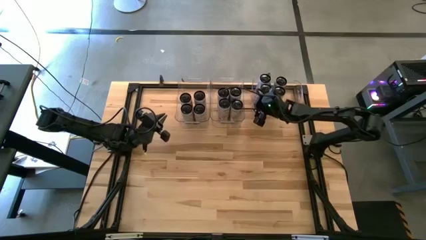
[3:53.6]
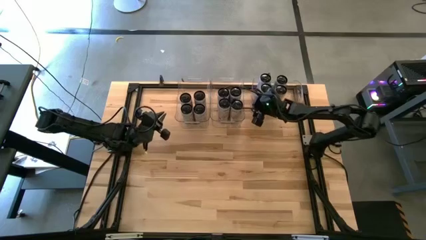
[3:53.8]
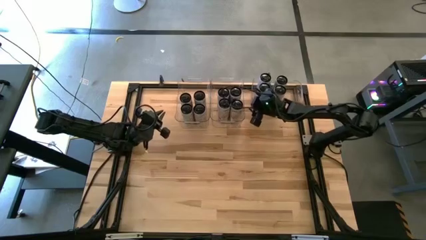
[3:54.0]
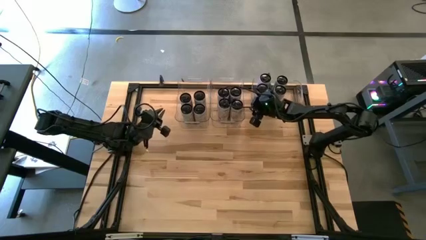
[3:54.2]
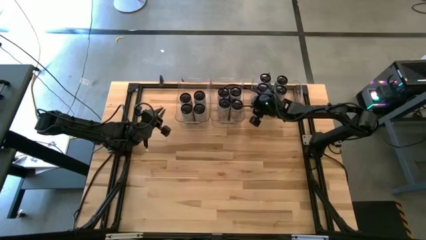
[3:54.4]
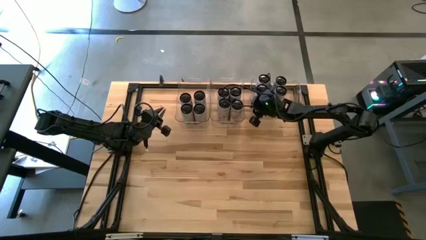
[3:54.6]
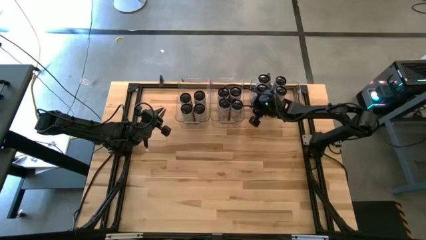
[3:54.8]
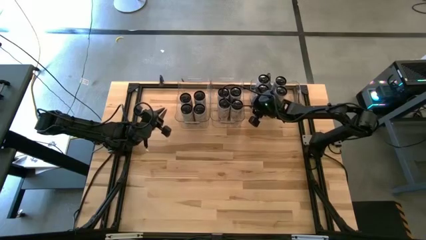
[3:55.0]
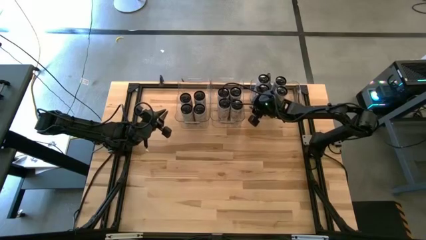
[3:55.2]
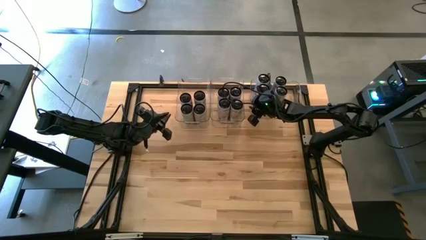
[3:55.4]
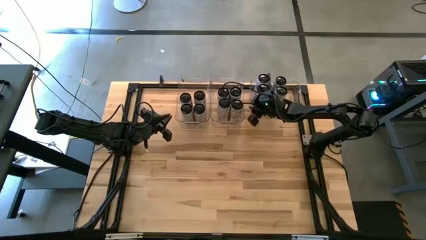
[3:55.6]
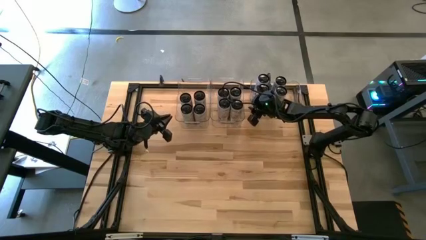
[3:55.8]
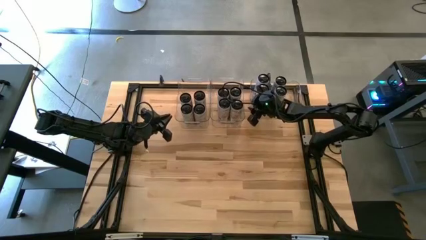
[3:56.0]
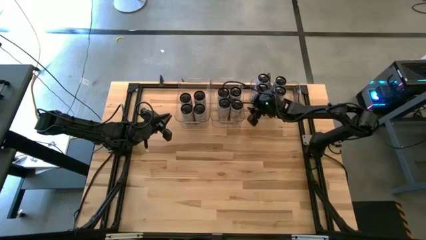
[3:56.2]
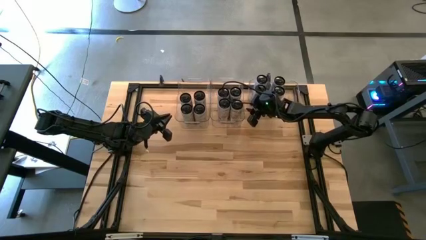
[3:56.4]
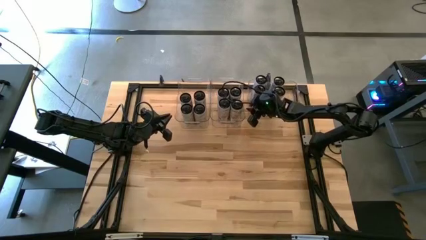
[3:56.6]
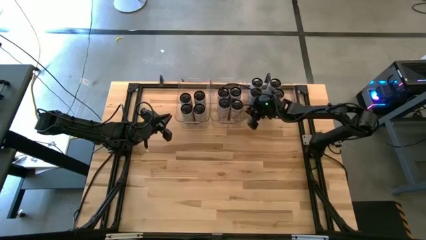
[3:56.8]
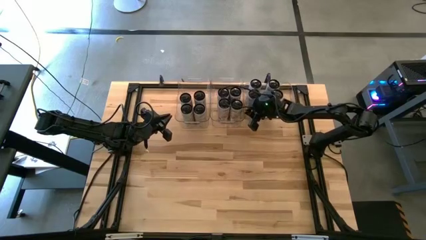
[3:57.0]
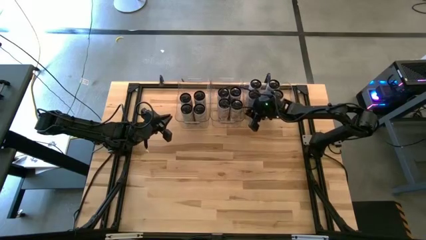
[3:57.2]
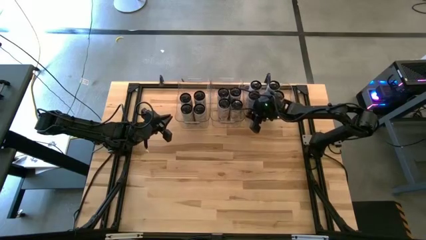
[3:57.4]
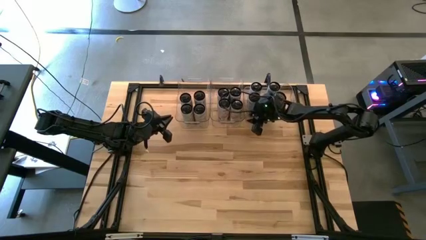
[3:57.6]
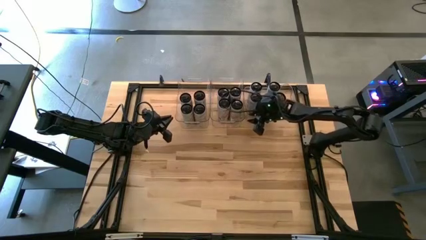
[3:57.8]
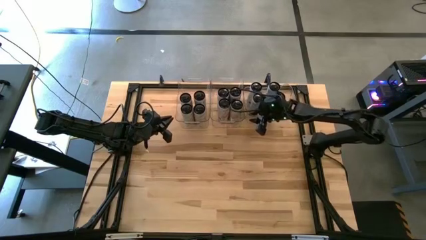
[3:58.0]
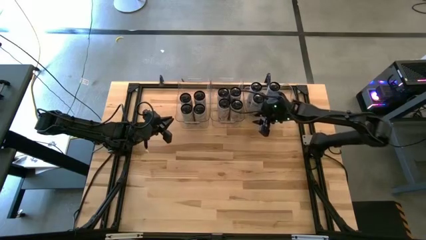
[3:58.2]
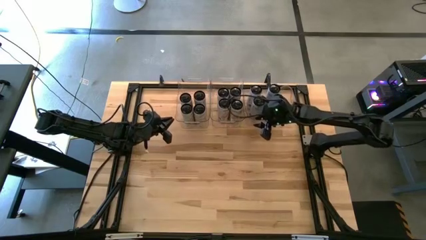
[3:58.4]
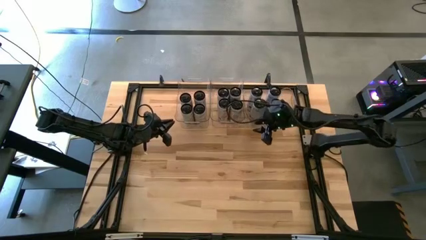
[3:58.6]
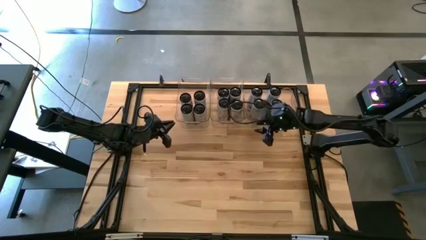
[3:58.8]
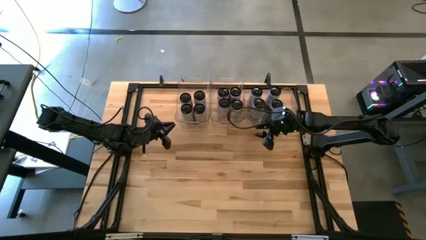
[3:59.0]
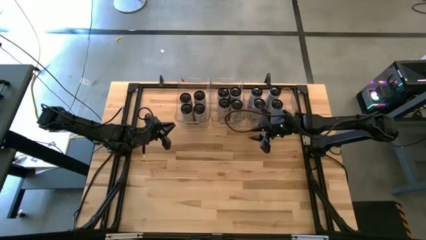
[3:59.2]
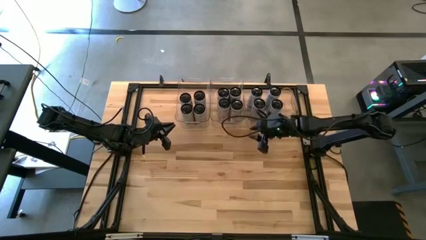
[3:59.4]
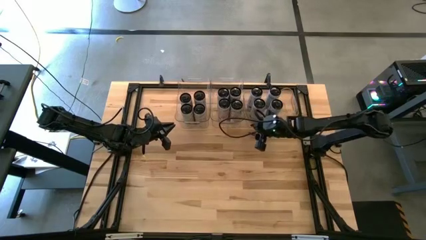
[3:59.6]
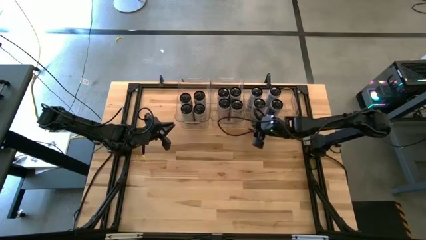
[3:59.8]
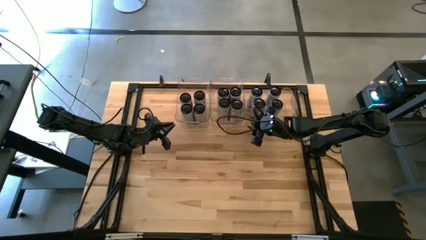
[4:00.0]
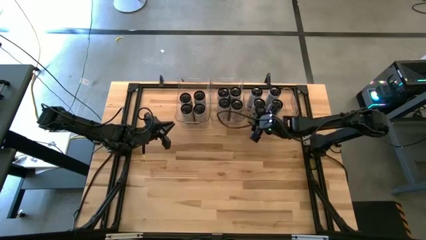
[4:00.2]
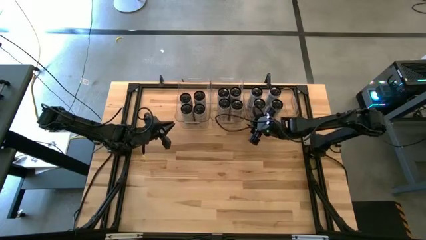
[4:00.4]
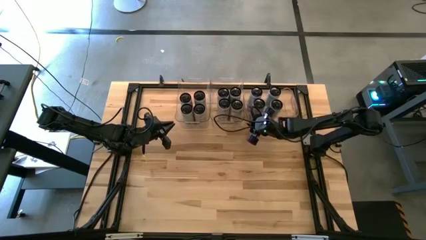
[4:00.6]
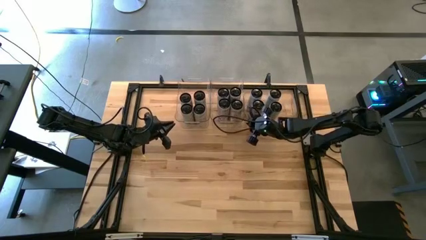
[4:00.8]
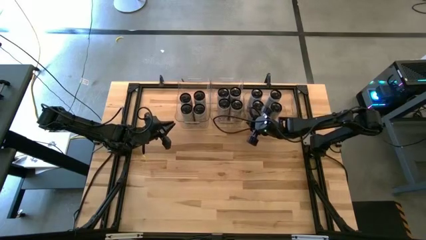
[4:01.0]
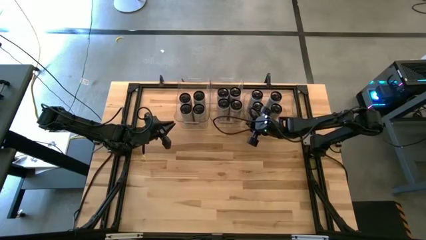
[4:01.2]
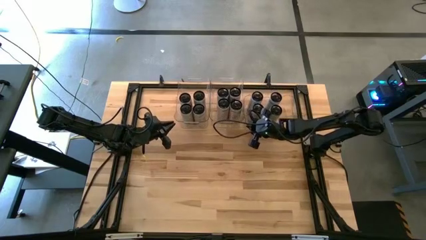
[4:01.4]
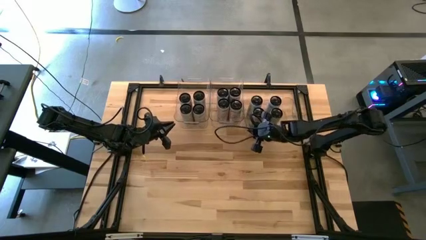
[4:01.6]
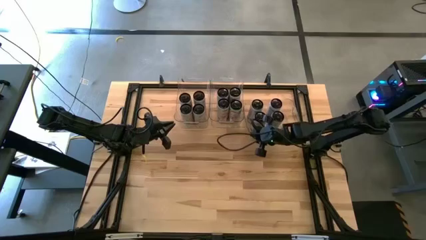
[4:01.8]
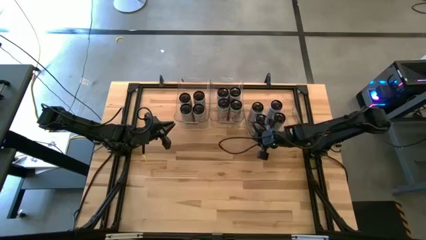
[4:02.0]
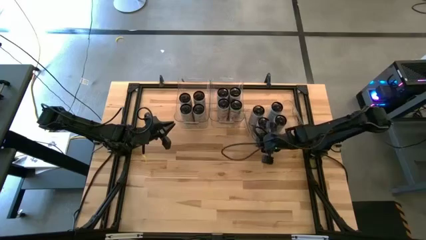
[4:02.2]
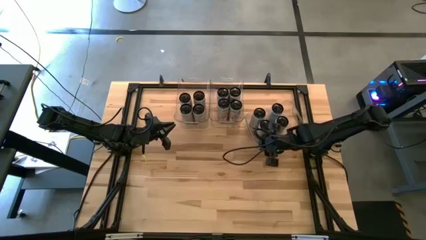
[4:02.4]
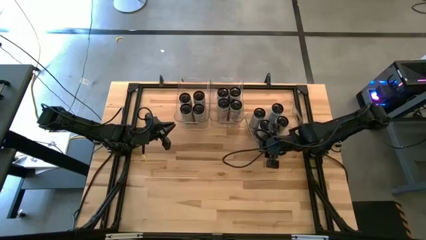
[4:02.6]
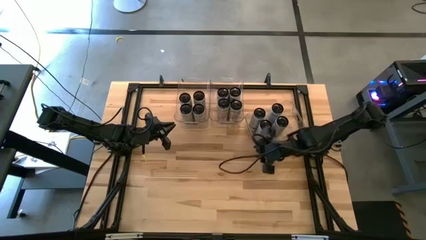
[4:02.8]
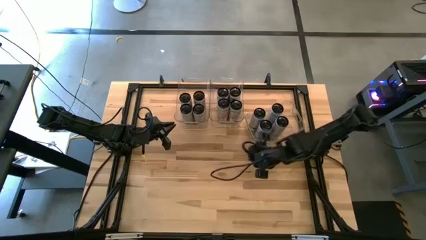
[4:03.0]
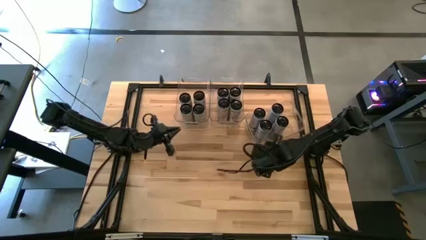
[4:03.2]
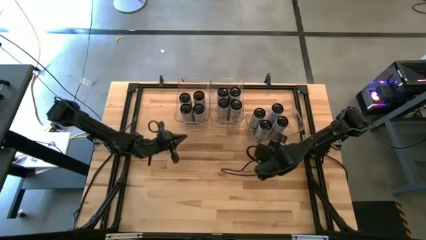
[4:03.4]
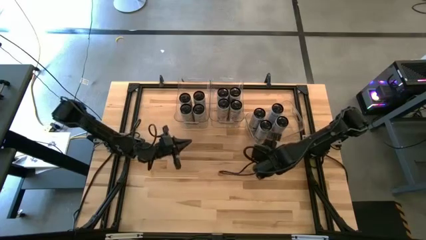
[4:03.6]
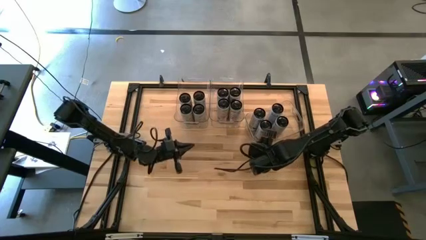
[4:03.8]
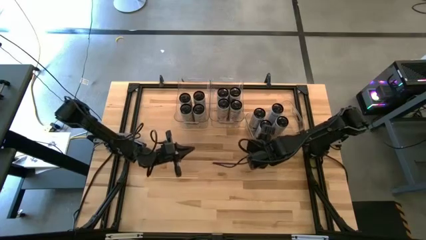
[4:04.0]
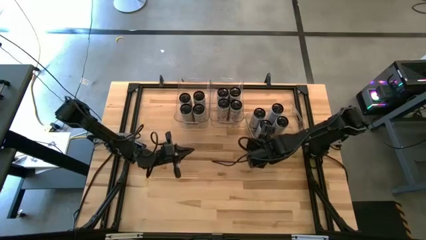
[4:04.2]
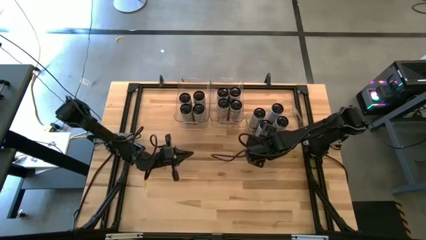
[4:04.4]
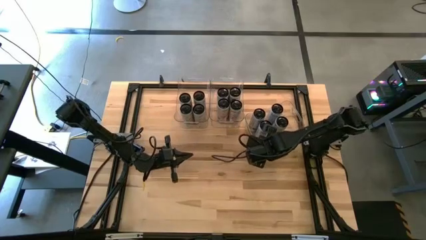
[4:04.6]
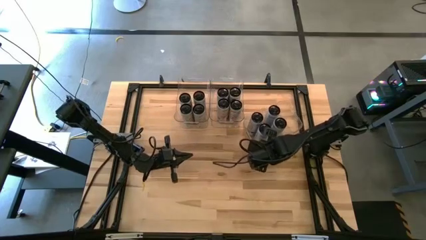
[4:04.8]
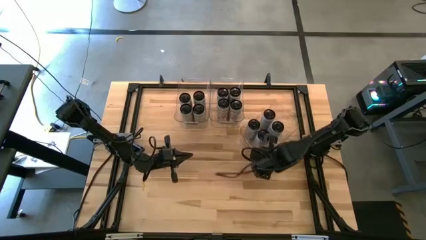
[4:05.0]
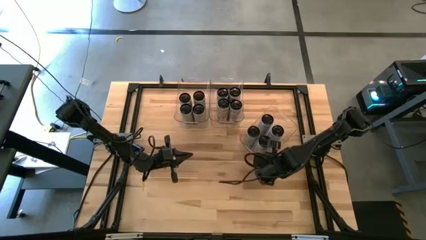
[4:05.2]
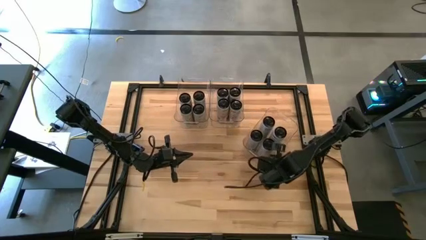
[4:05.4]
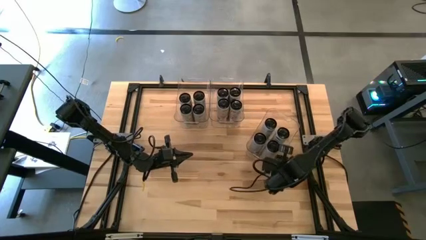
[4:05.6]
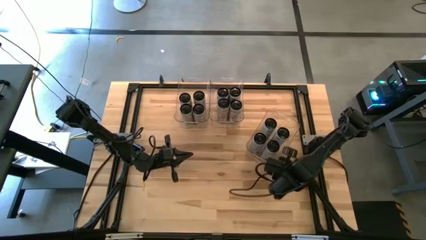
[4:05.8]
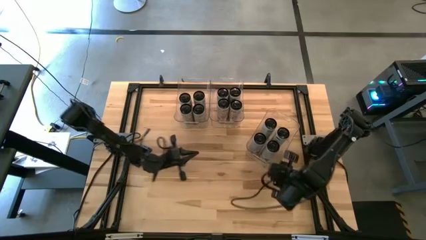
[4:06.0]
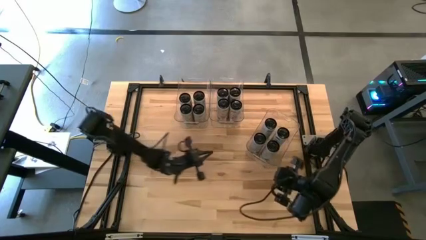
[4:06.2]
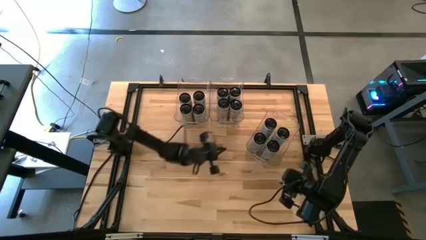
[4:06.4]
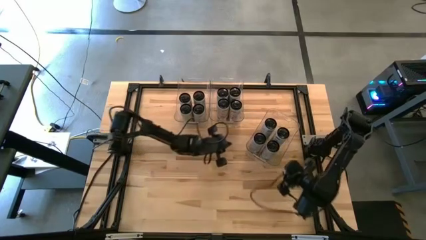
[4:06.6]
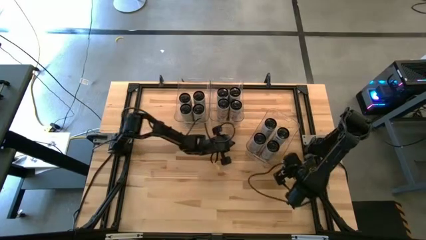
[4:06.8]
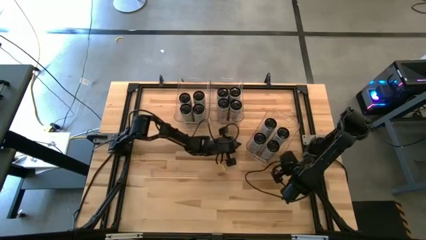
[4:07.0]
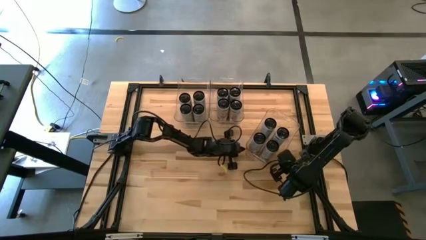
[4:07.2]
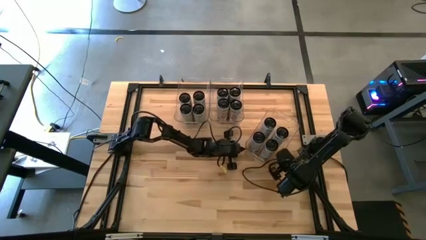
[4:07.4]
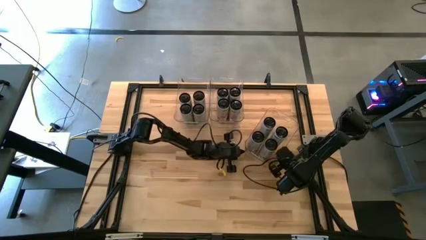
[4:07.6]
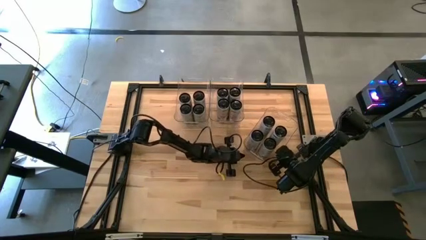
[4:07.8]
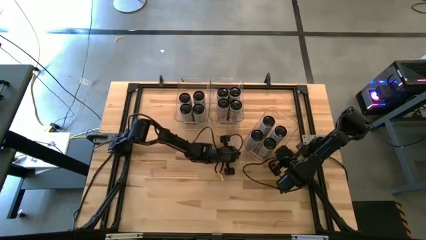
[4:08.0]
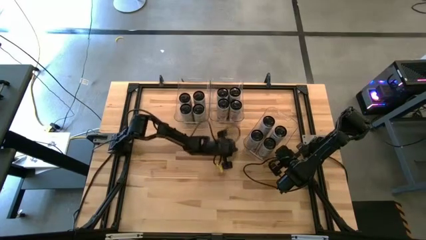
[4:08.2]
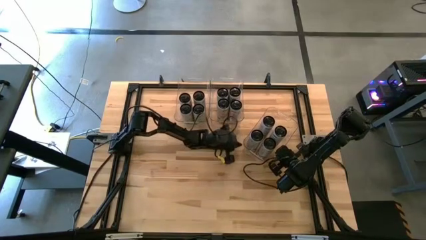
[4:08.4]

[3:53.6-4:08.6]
Task: Sort soda cans
Adjust all the transparent bins to the top of the table
